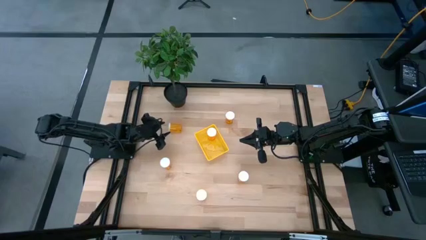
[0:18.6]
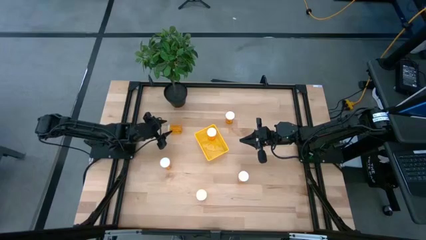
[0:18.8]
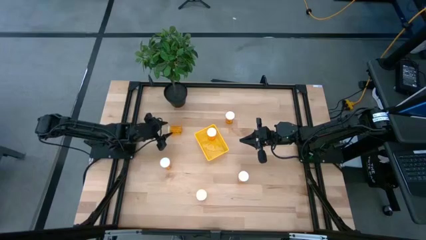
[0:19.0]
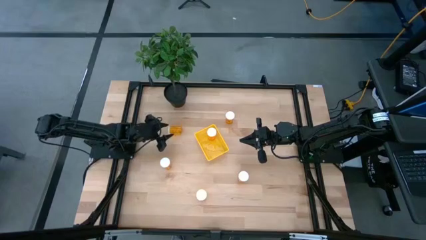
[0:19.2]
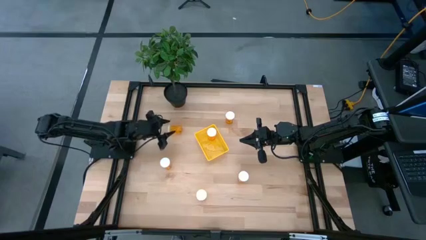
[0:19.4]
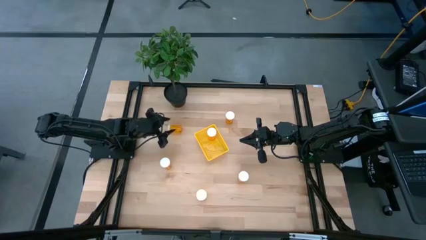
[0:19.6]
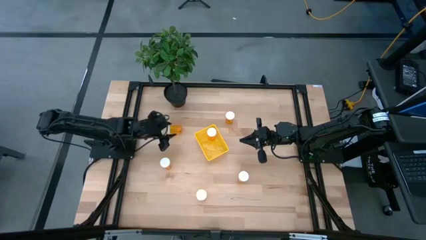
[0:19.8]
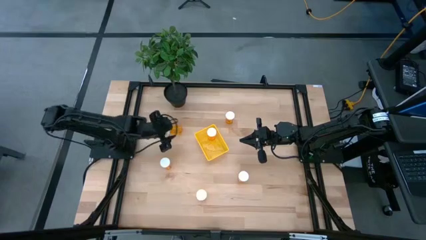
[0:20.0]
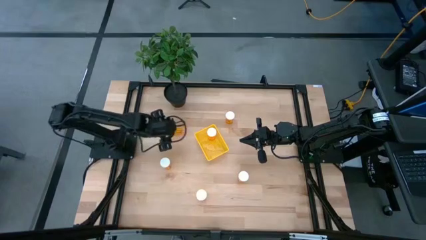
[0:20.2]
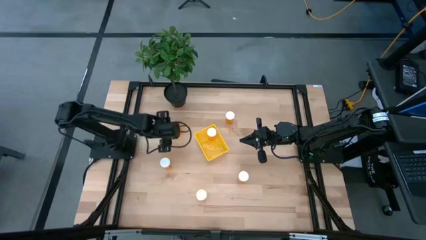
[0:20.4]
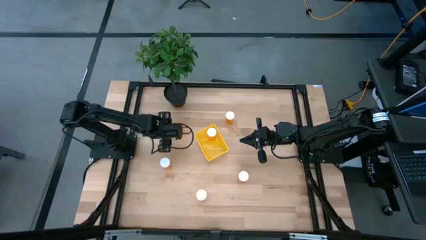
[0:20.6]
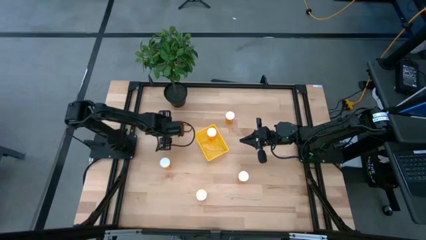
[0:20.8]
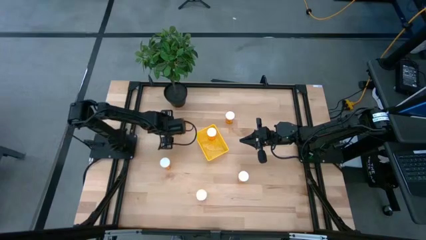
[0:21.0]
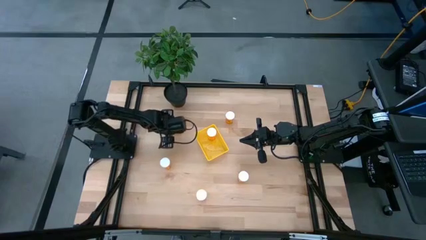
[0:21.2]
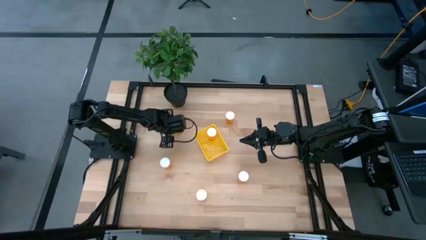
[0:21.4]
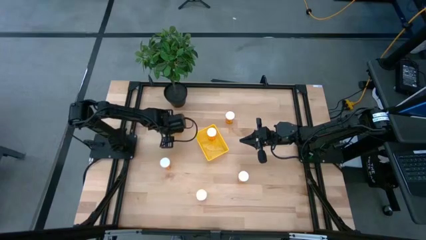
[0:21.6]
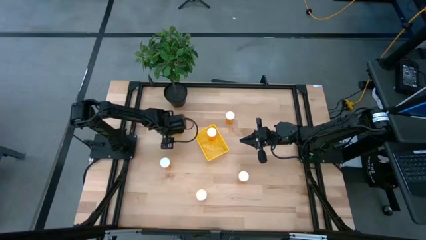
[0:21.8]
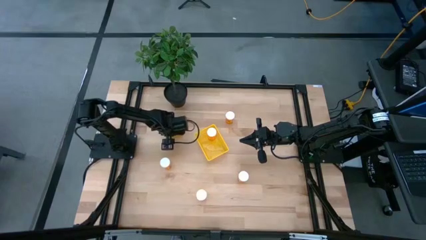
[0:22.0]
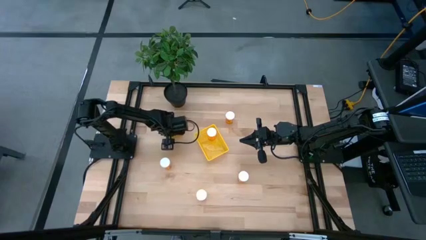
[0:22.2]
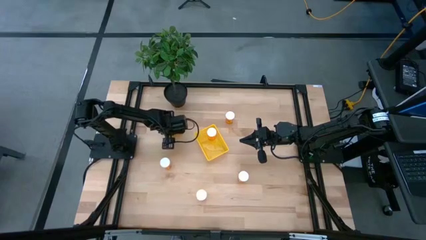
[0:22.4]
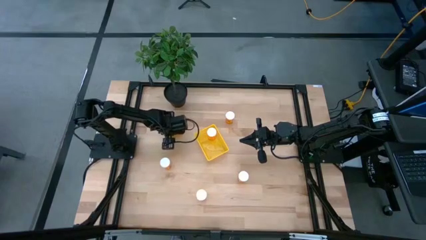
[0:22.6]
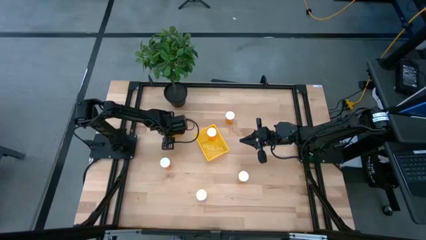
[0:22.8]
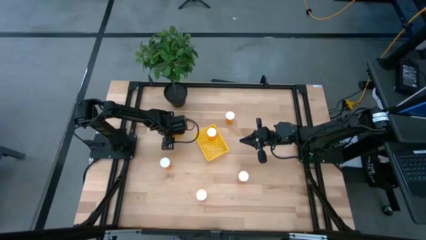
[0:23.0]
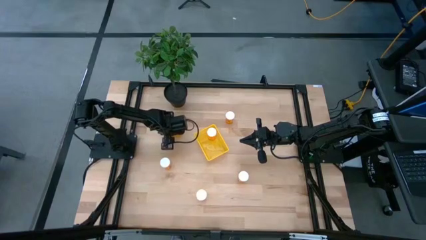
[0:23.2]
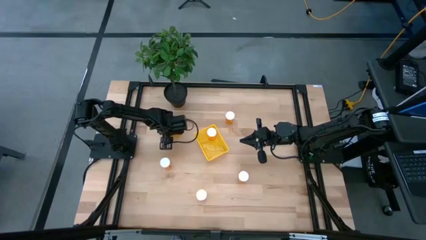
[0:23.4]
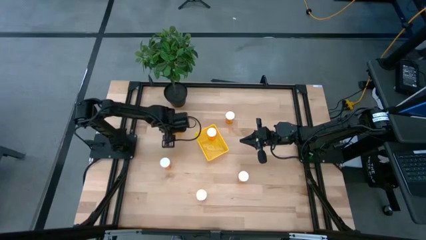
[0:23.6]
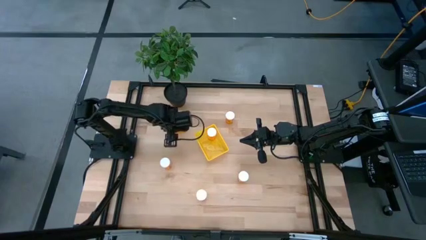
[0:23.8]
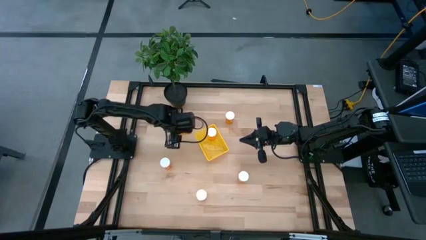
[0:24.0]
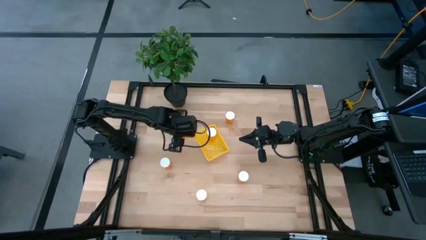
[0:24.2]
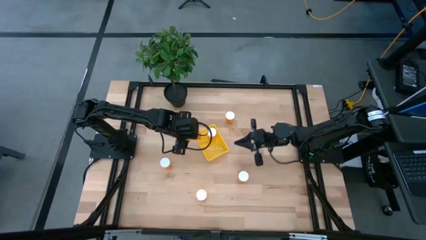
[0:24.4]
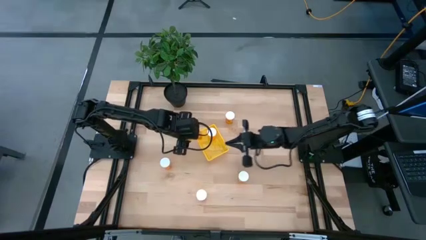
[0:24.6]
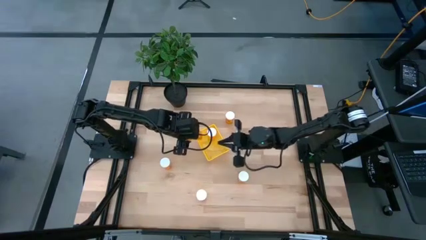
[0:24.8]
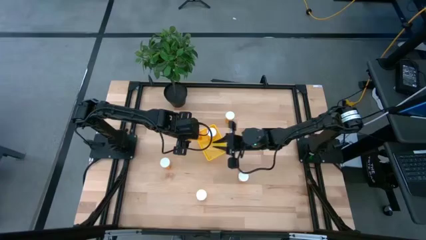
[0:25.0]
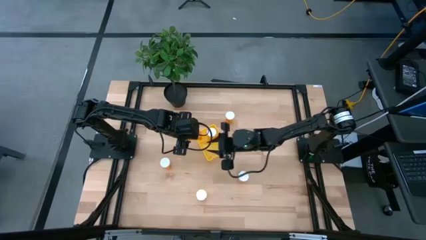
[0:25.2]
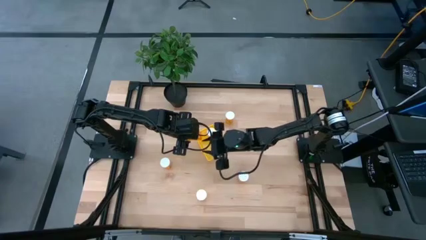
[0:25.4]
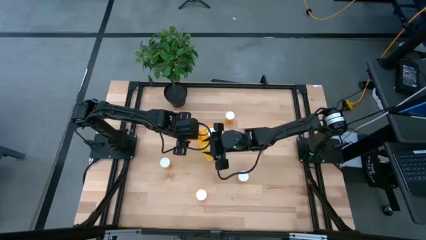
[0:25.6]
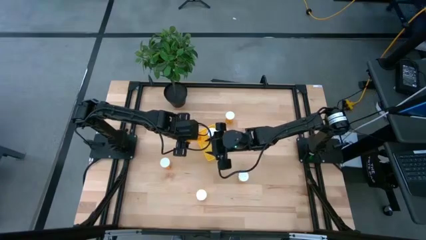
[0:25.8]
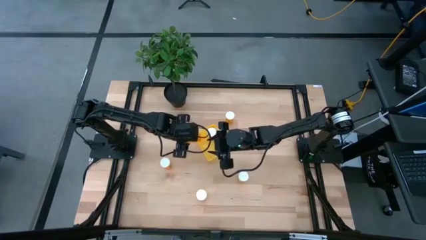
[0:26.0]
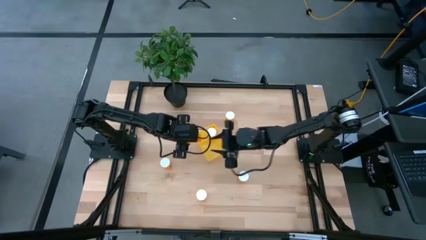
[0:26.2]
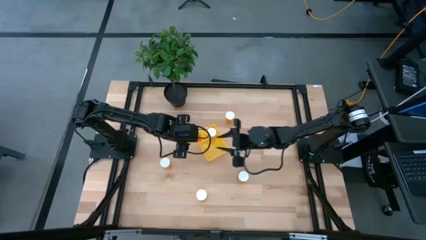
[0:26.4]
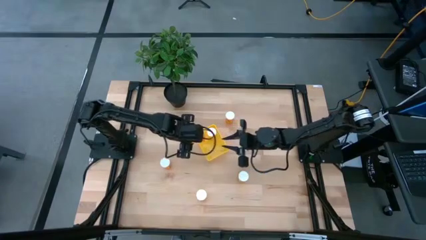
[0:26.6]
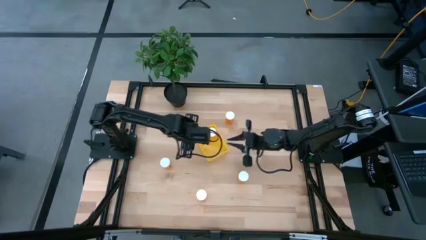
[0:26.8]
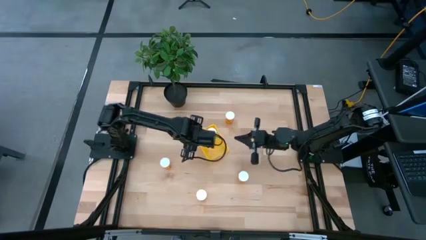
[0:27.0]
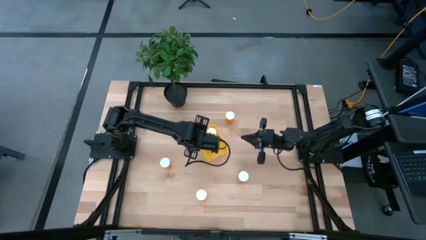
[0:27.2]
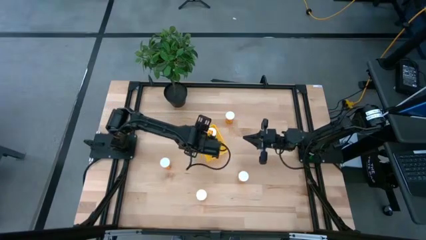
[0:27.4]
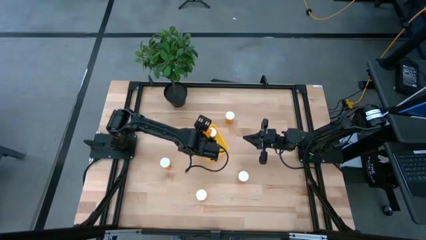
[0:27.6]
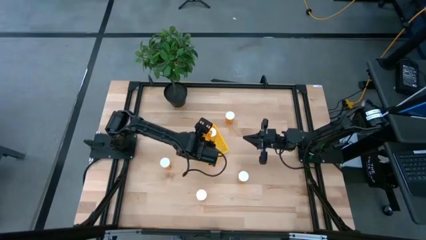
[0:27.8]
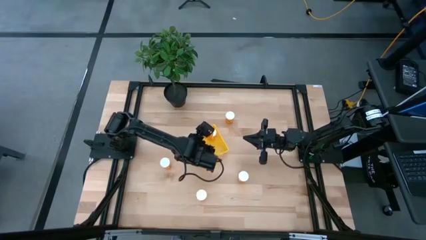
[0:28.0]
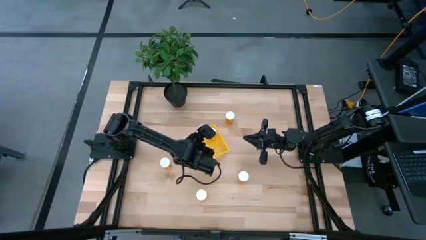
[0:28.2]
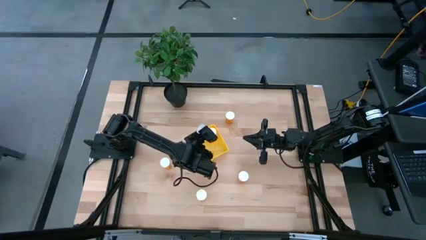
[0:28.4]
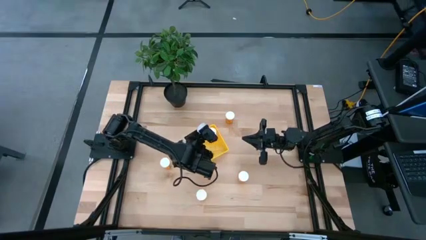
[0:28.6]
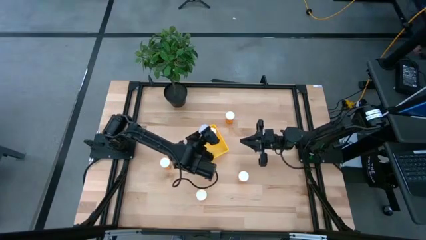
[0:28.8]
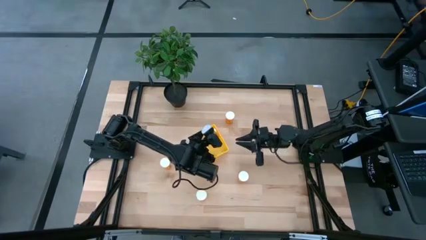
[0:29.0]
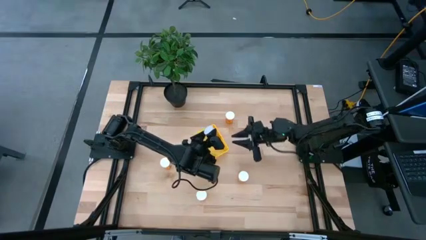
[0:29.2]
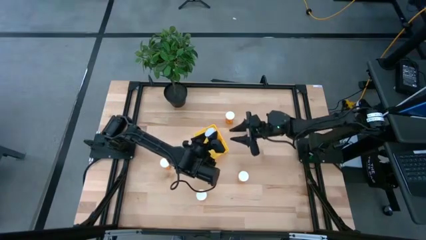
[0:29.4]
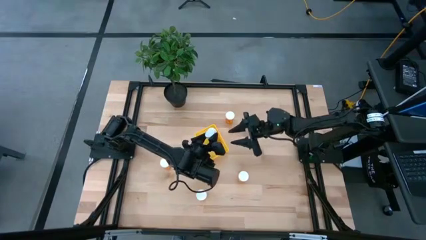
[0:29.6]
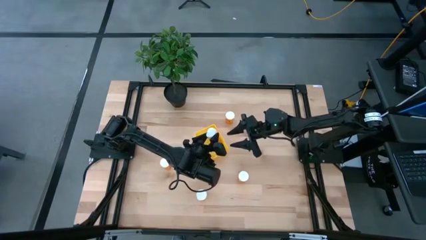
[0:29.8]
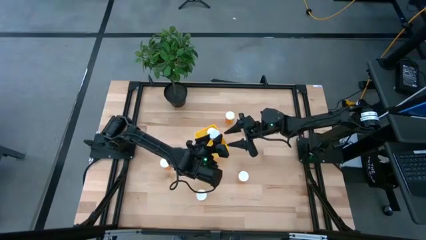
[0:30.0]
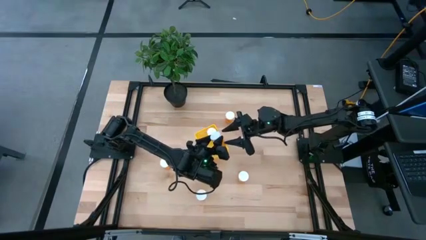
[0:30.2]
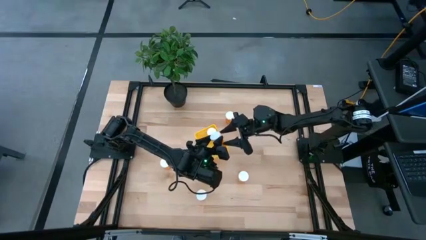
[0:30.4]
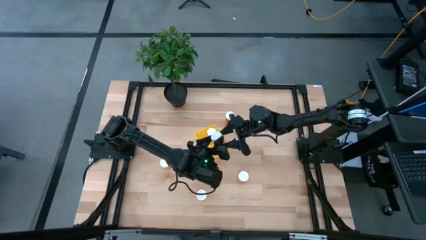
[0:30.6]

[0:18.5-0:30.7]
Task: Pick and place pill bottles into a basket
Put the pill bottle into the bin
